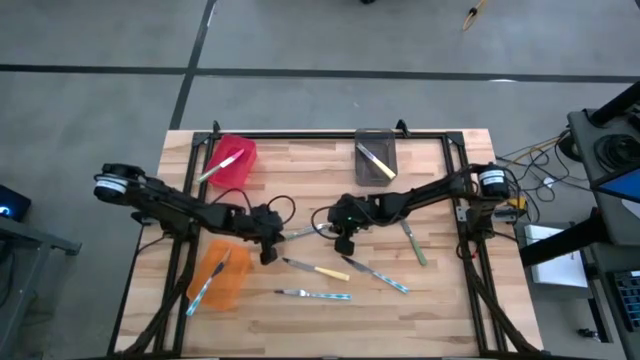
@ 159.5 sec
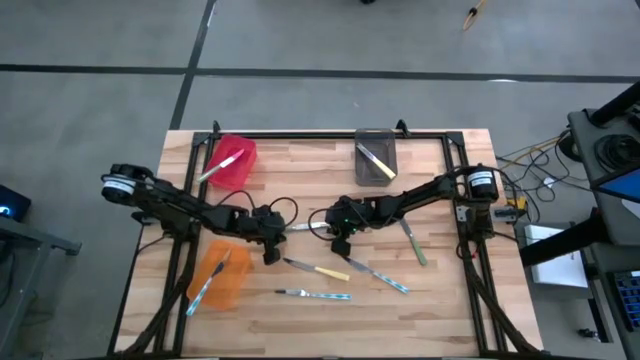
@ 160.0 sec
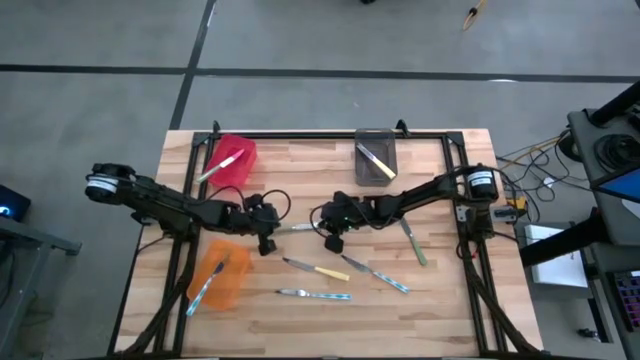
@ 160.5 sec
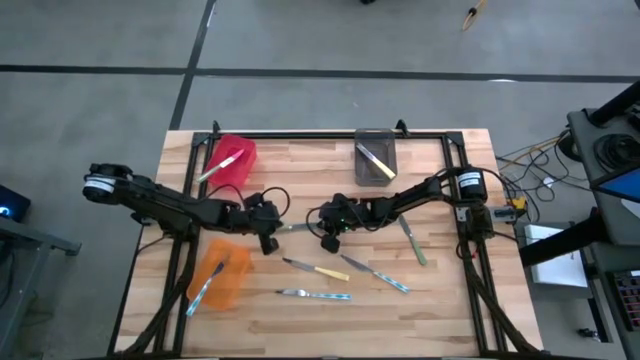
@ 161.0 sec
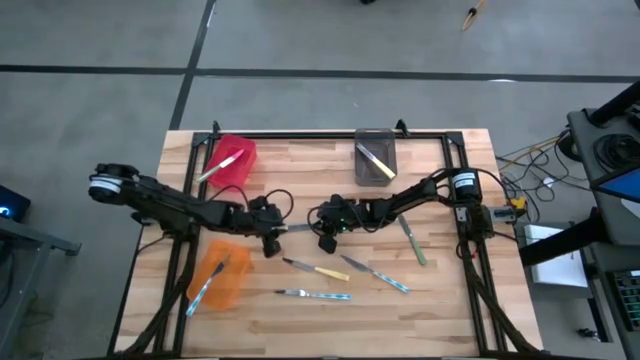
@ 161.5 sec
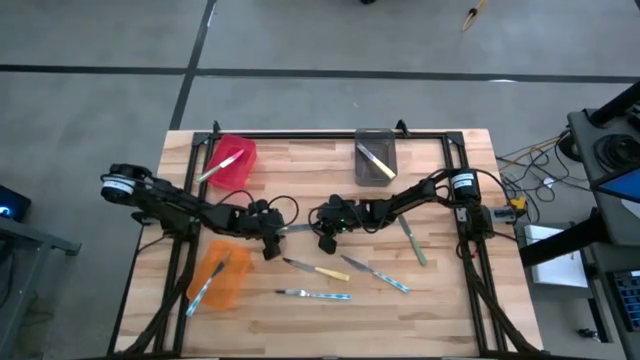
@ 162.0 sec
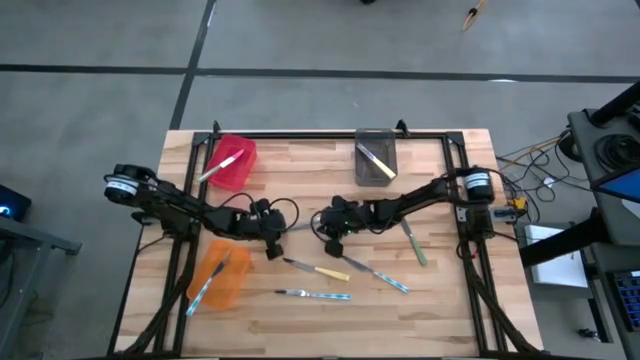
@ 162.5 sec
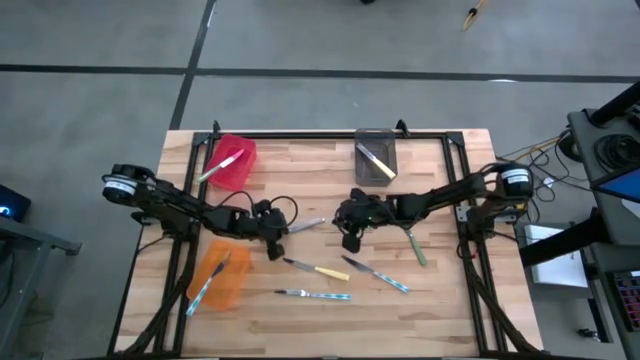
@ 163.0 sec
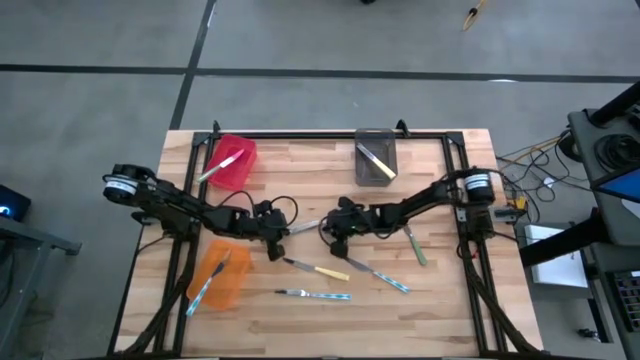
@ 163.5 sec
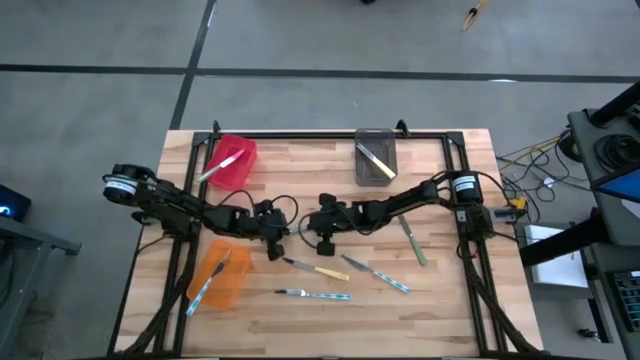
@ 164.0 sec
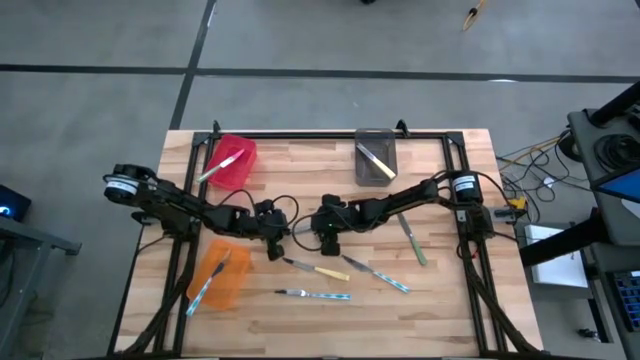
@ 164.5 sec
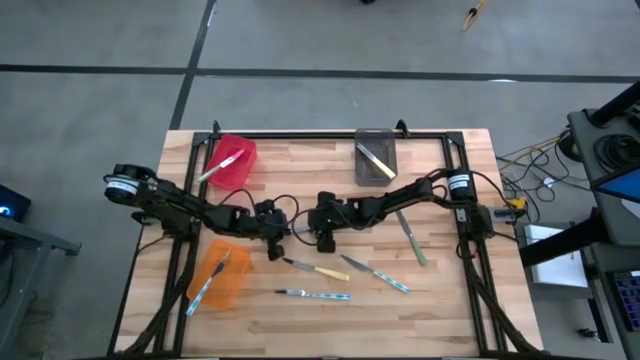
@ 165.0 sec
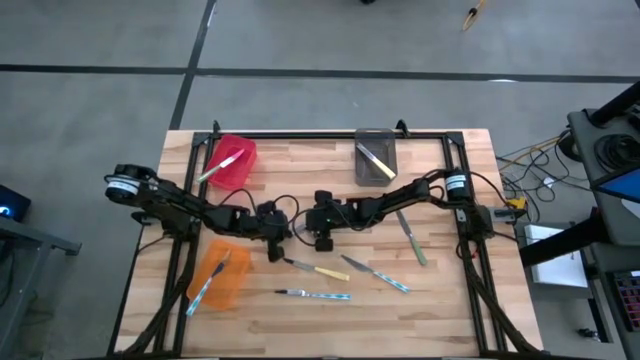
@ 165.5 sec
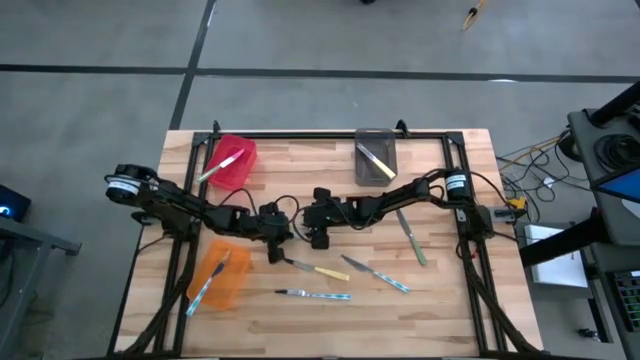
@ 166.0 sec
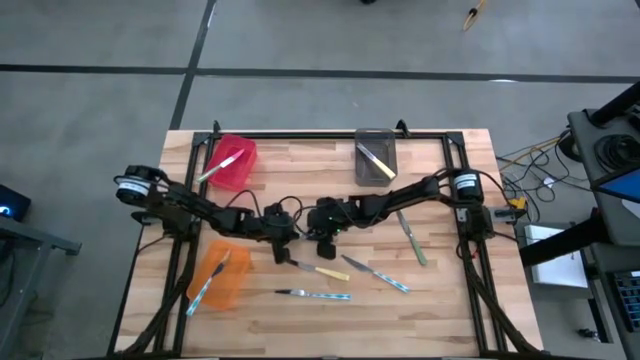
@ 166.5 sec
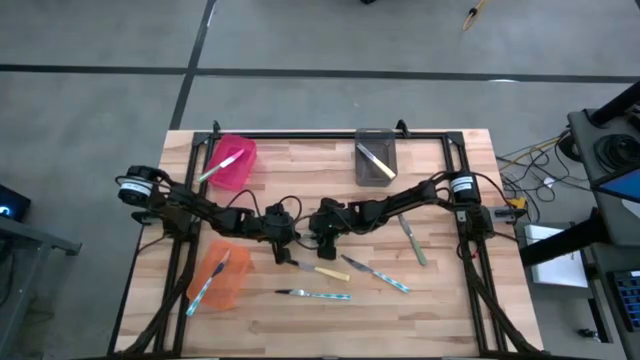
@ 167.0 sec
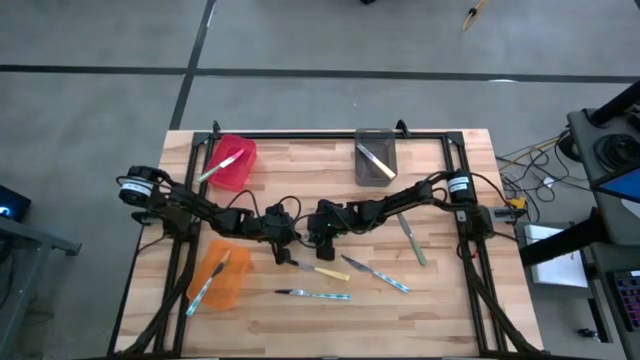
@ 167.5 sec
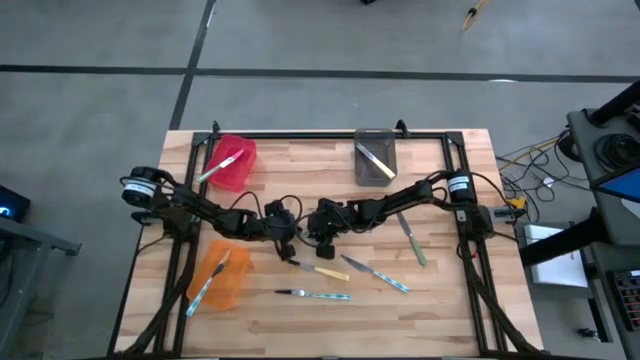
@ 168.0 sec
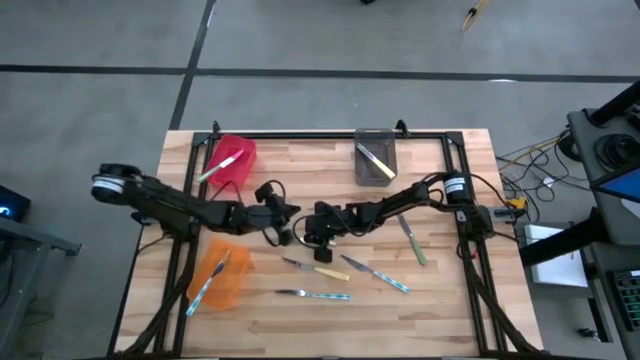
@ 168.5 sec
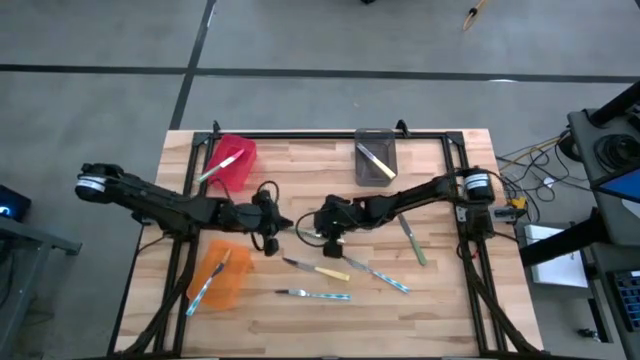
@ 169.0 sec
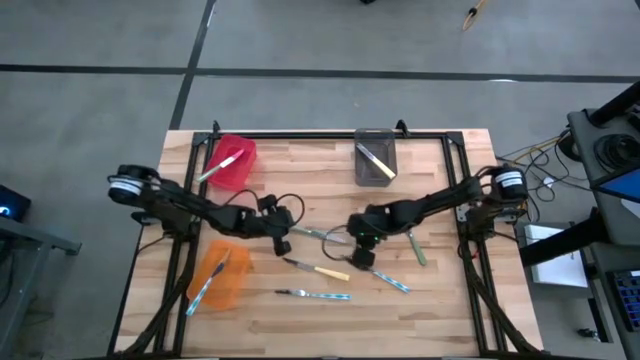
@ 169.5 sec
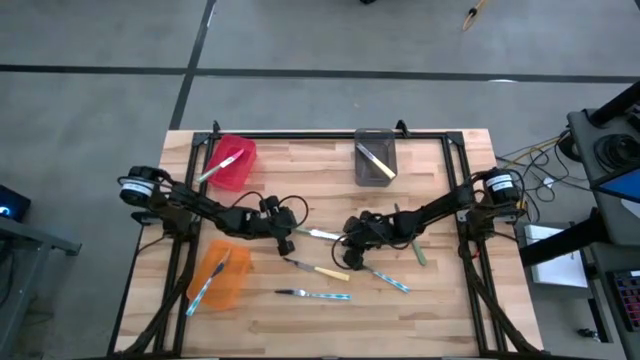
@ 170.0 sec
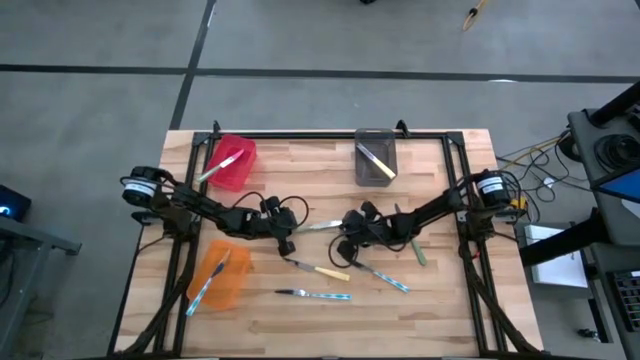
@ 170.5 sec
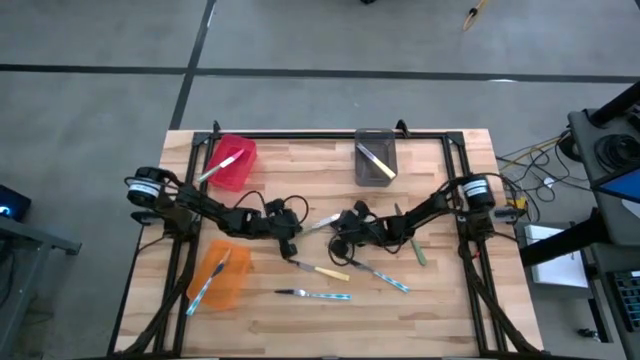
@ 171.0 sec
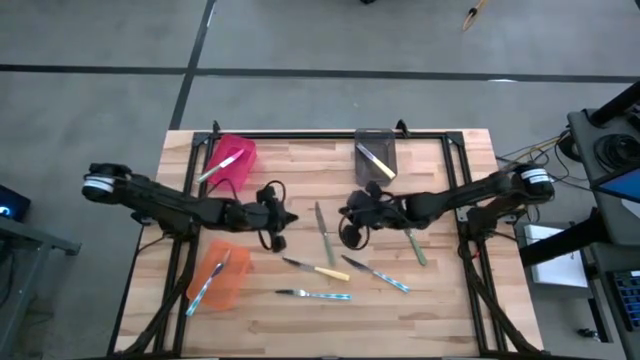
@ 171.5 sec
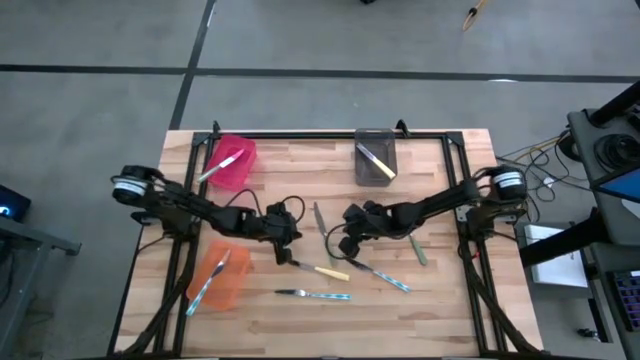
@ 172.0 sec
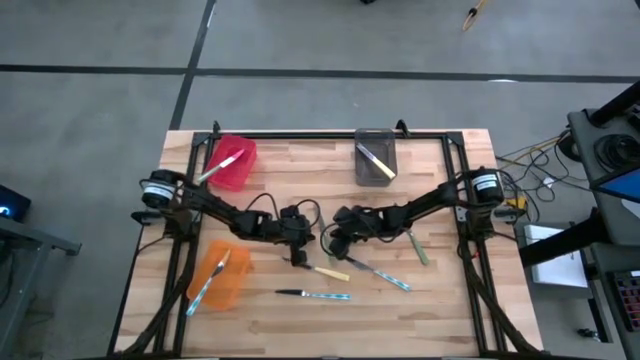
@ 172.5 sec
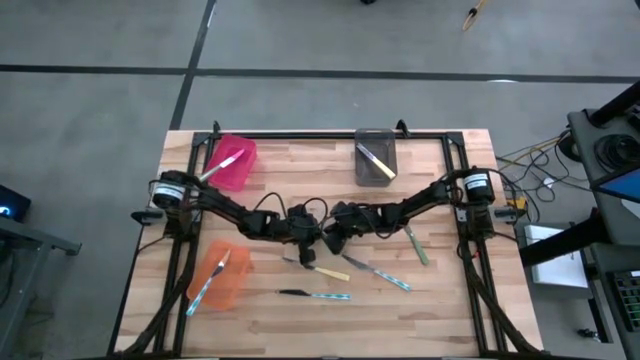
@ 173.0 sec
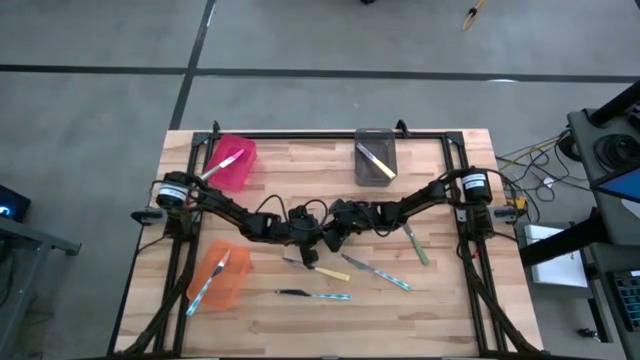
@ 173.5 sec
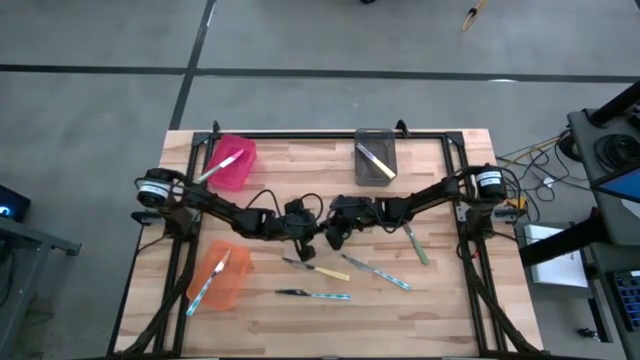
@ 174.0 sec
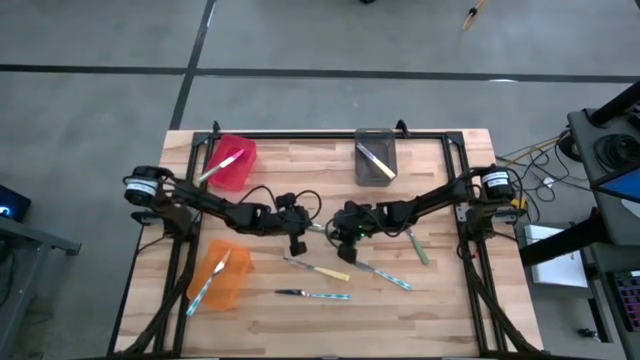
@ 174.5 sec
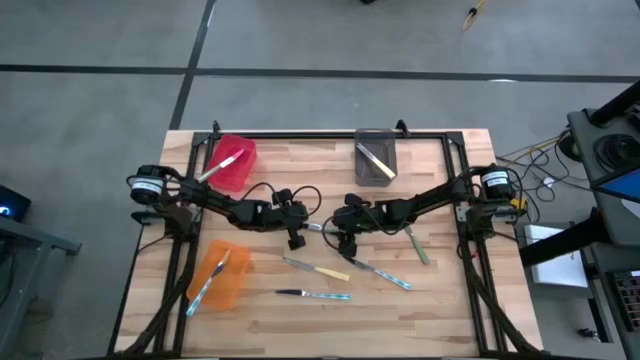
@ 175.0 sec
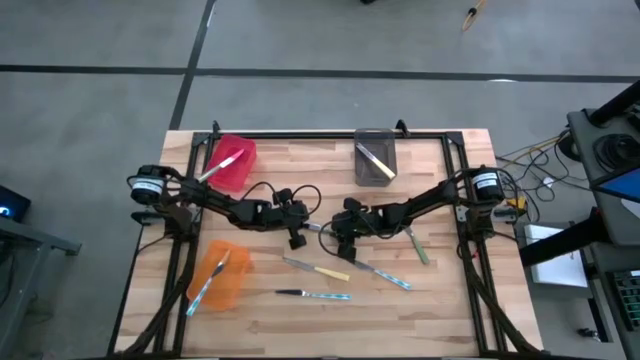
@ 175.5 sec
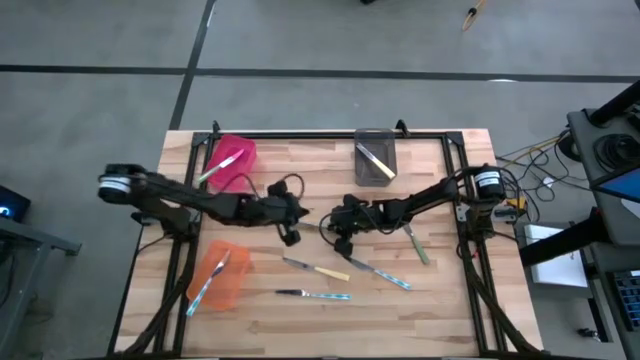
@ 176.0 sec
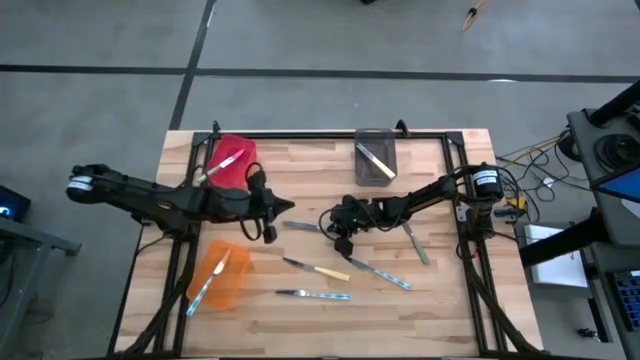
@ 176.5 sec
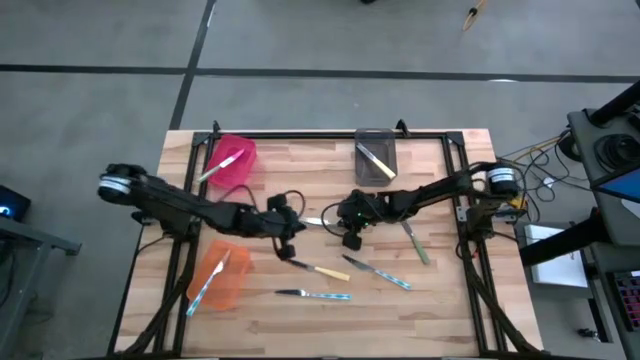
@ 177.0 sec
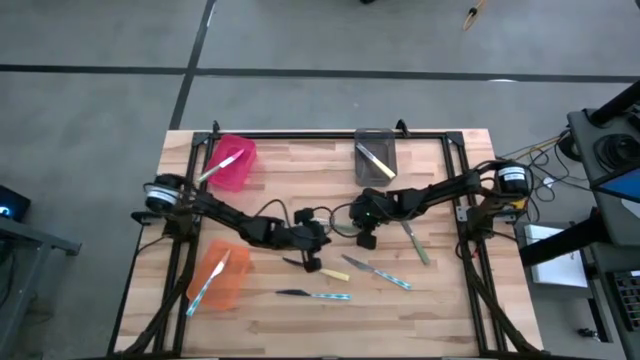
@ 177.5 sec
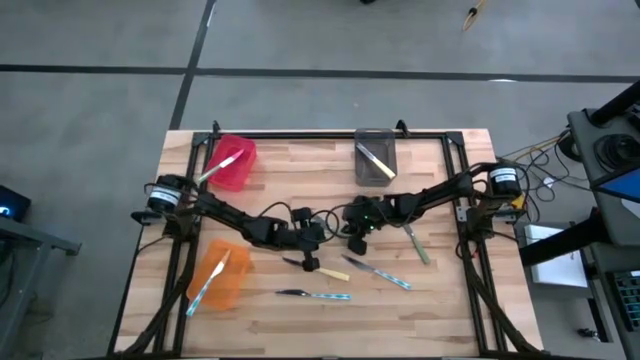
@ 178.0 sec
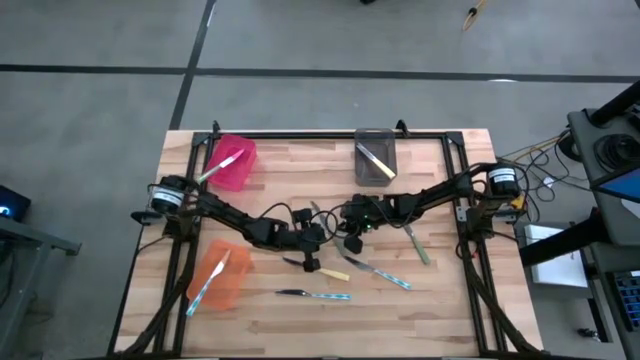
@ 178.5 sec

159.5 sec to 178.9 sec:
Task: Sort silverware by color (type)
Put the left green knife into the red bin

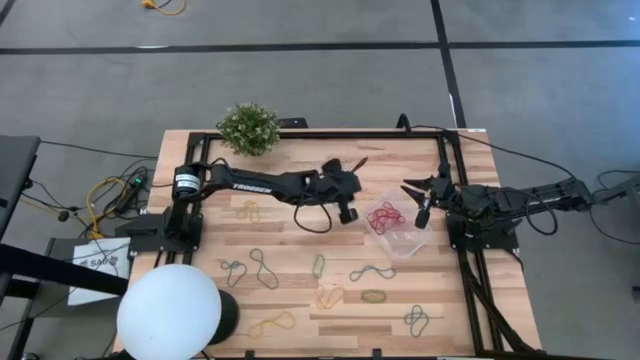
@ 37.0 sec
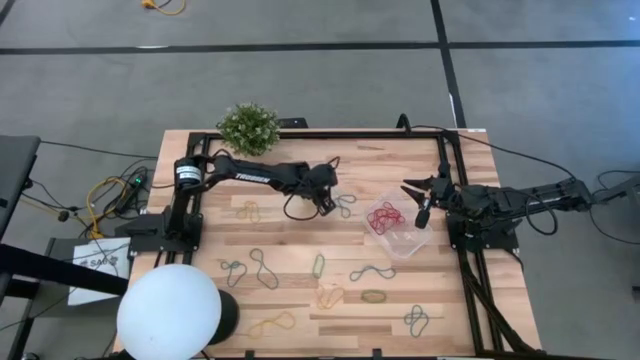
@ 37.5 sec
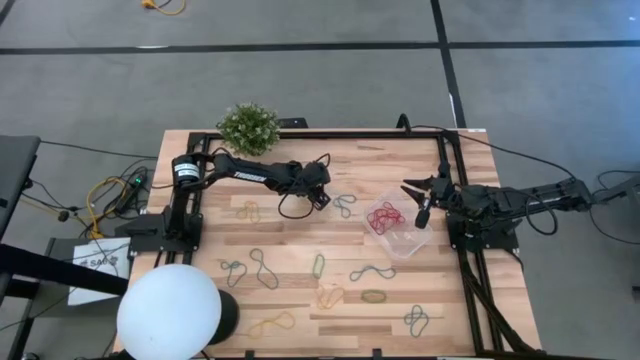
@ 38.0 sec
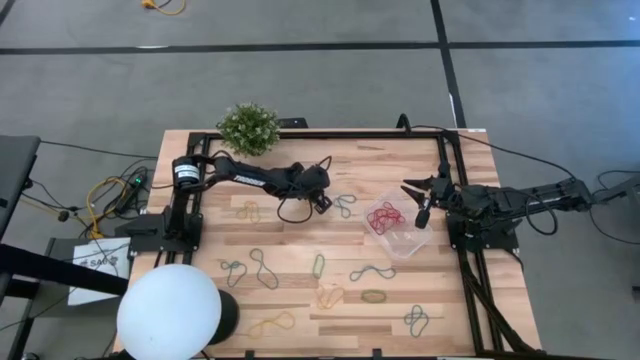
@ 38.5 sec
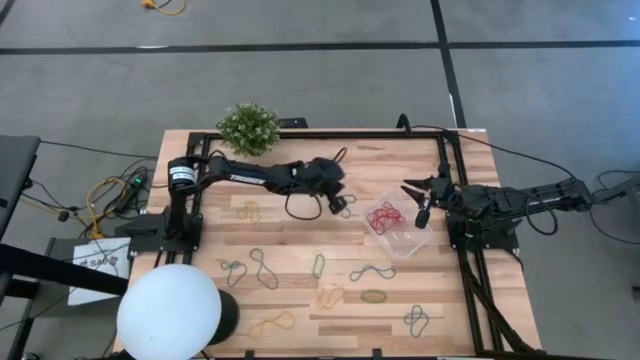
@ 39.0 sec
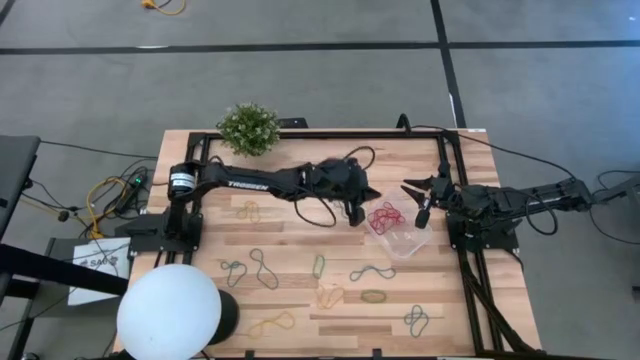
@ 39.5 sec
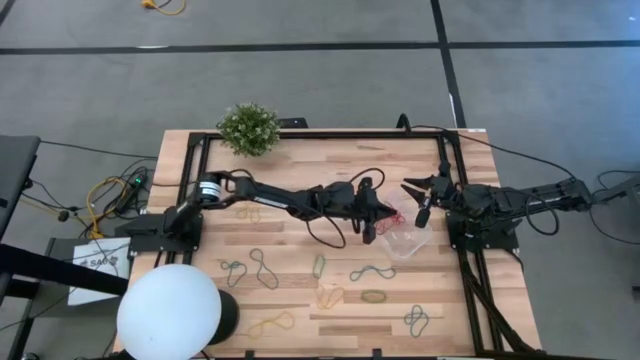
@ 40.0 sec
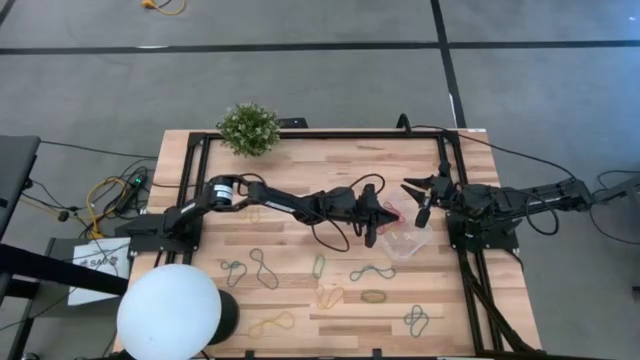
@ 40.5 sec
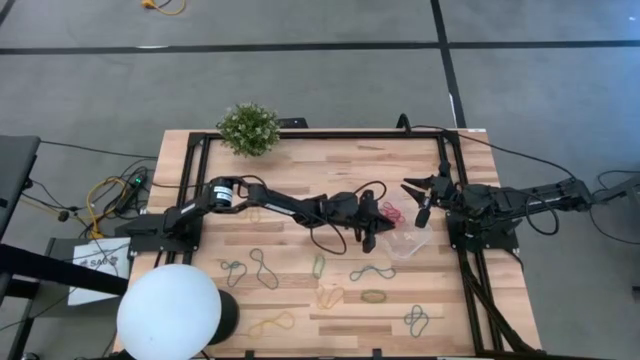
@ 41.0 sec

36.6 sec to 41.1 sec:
Task: Pick and place items into bin
Put the yellow rubber band into the transparent bin
